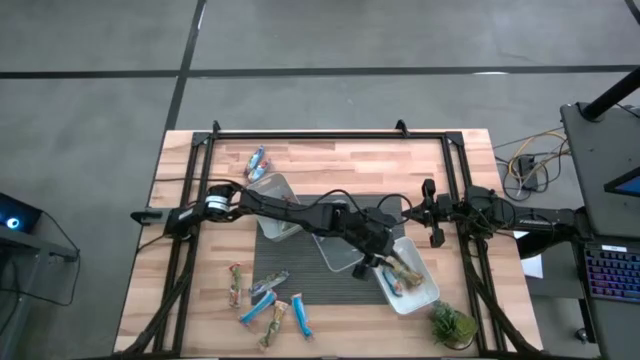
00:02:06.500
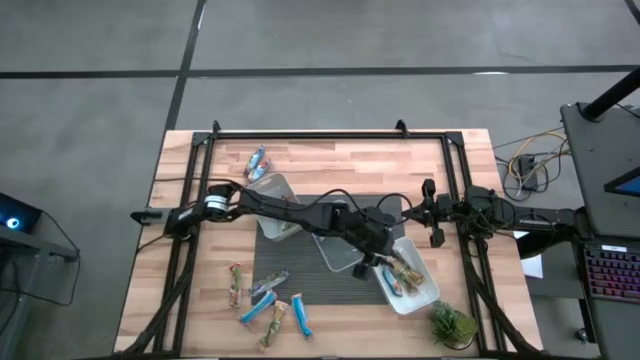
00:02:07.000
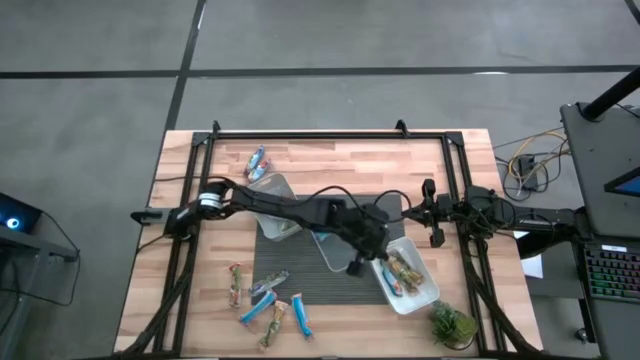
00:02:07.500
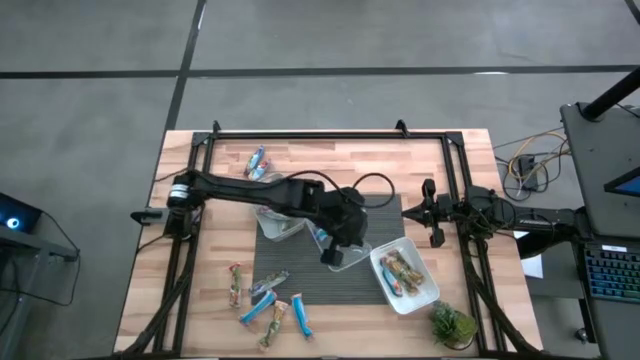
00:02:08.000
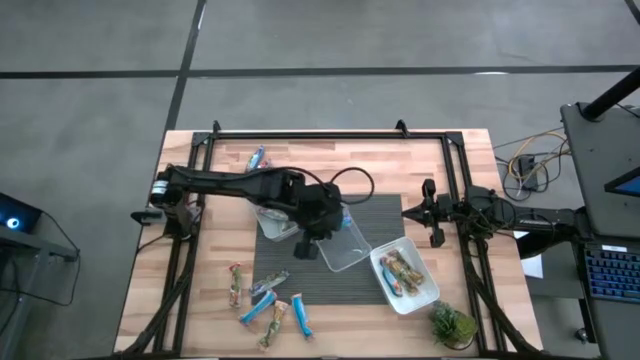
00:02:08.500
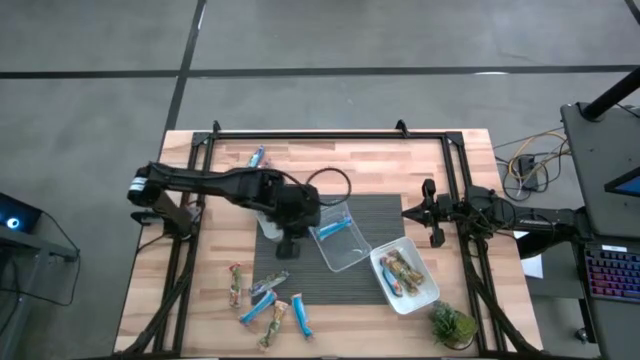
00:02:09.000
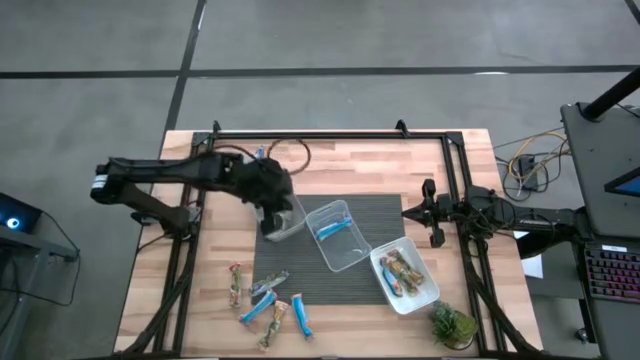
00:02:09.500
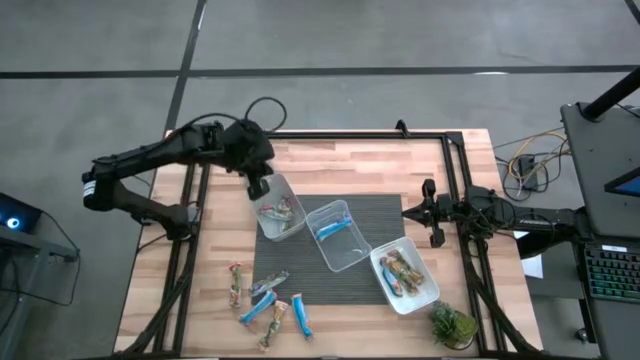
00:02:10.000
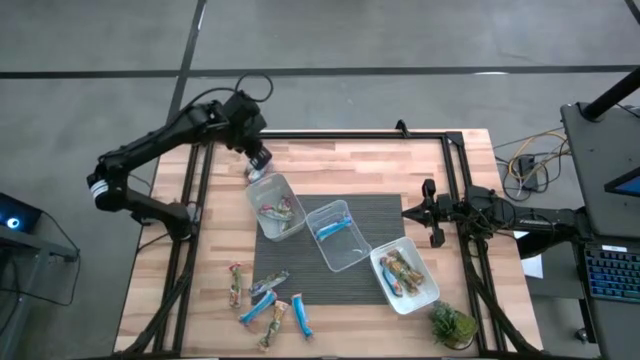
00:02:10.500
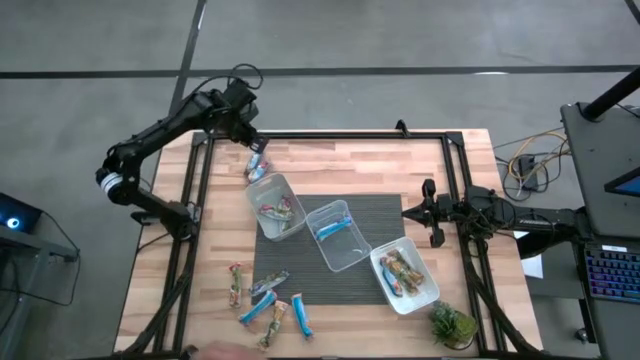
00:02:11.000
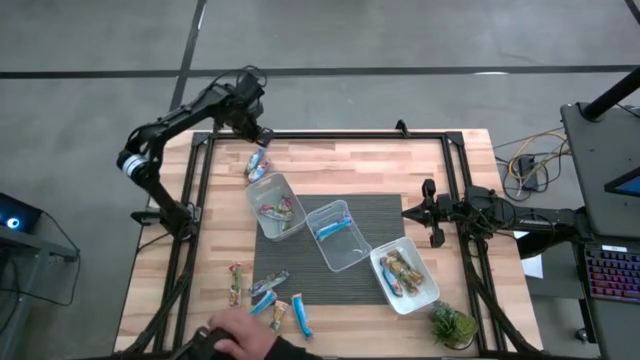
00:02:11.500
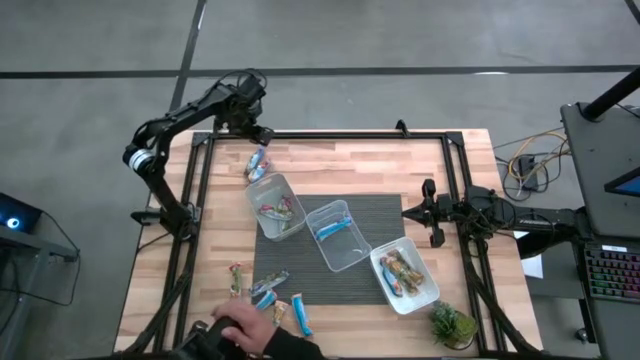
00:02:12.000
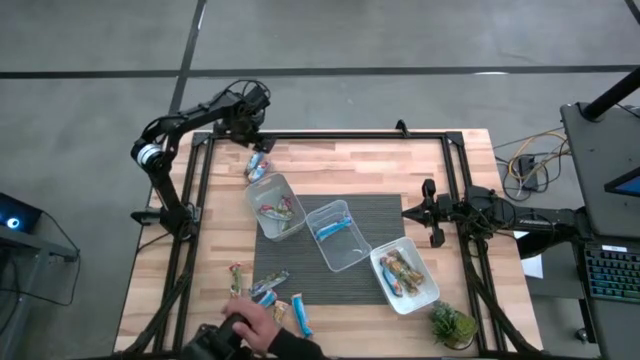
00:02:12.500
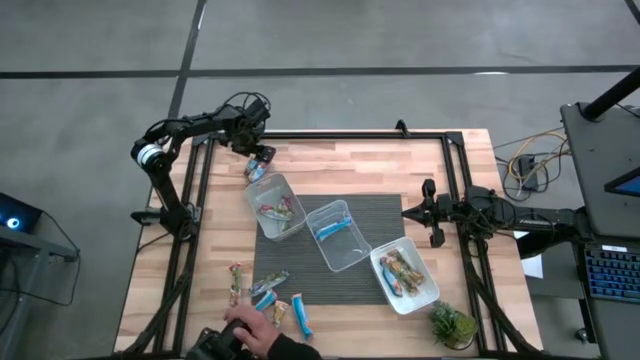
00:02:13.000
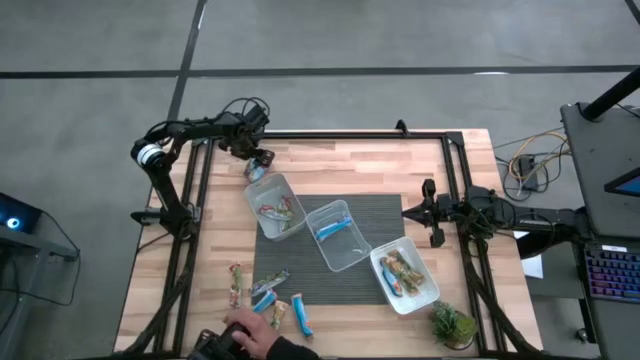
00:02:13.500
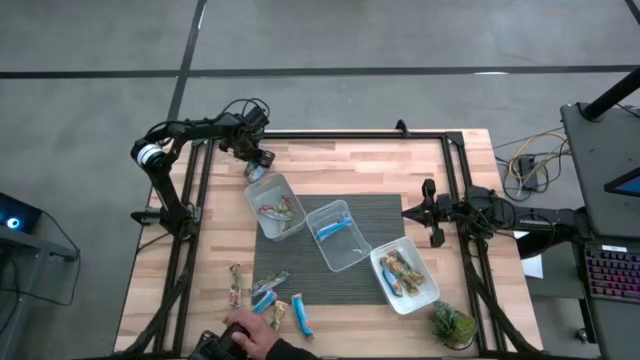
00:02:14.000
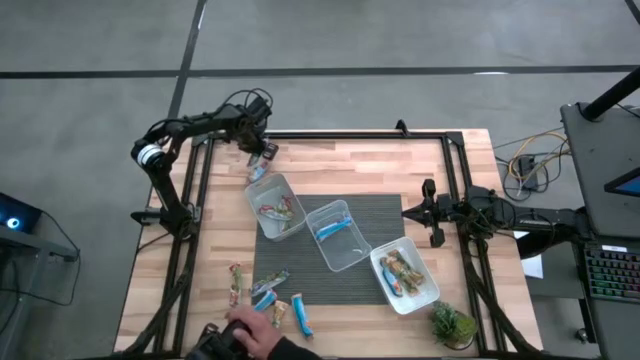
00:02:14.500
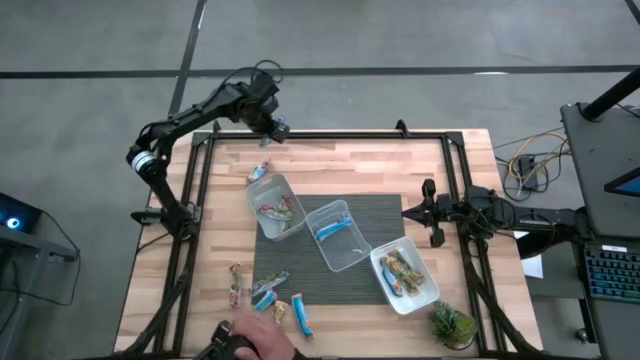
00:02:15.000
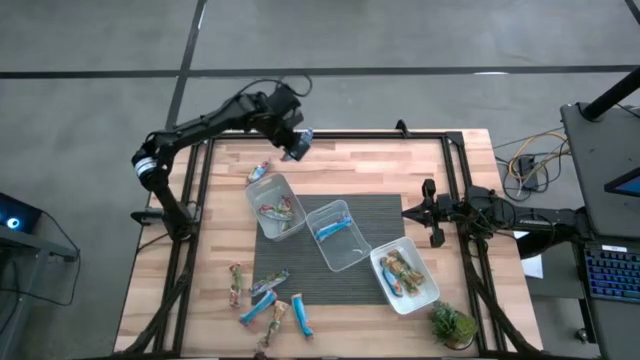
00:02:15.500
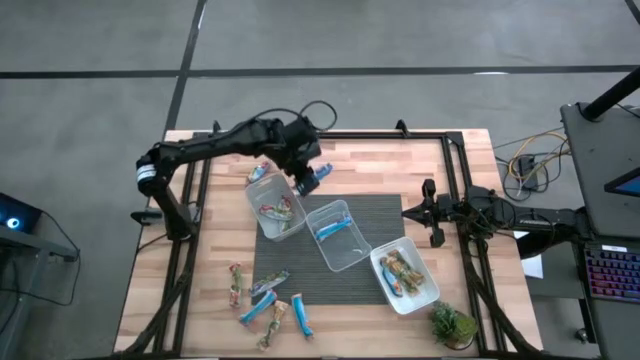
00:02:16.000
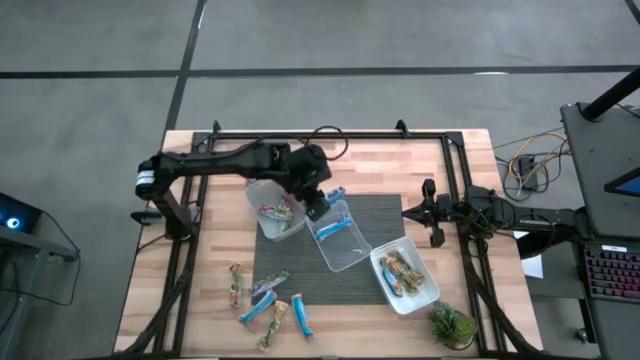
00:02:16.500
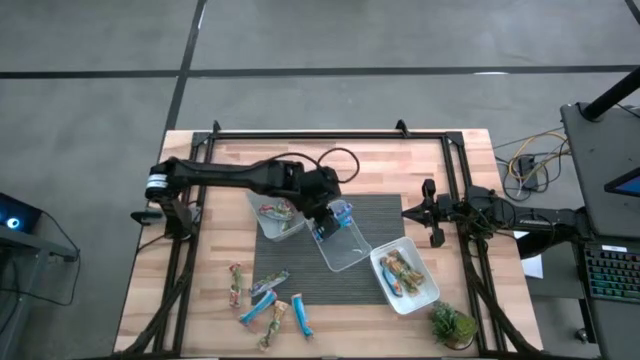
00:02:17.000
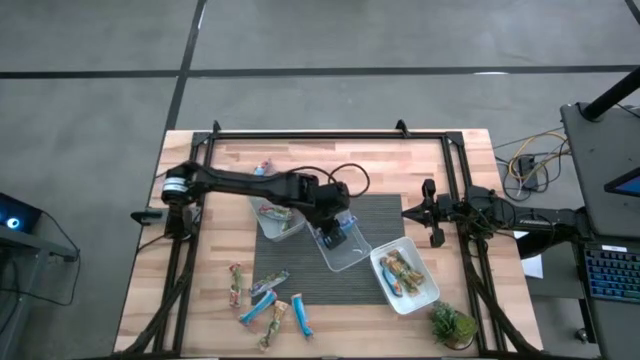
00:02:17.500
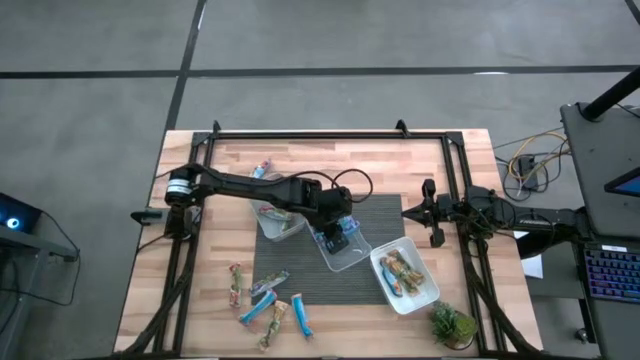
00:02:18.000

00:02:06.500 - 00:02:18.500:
Task: Pick and place Granola Bars by type
Put the blue granola bar into the transparent bin

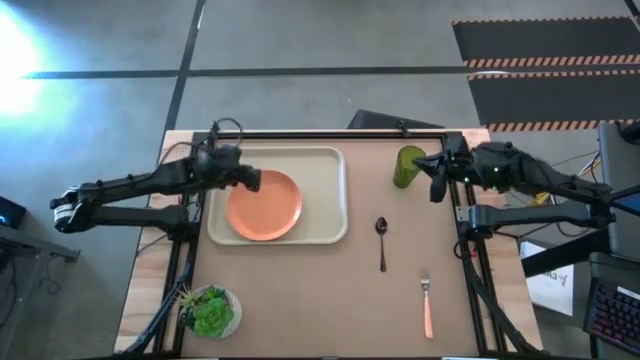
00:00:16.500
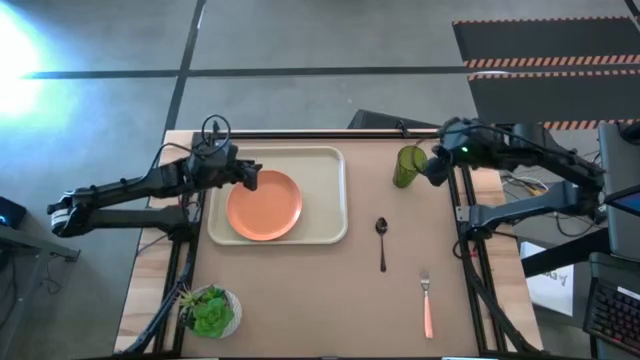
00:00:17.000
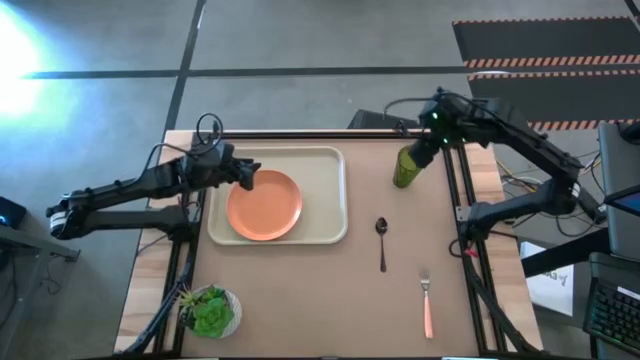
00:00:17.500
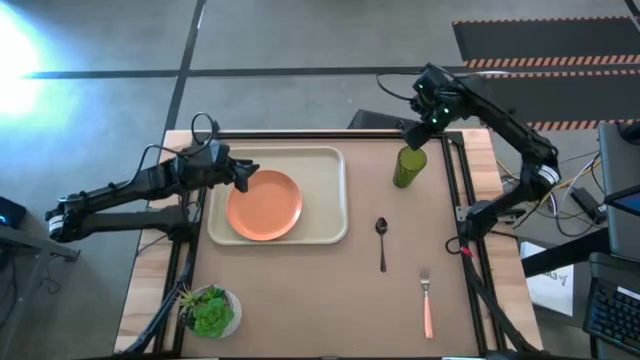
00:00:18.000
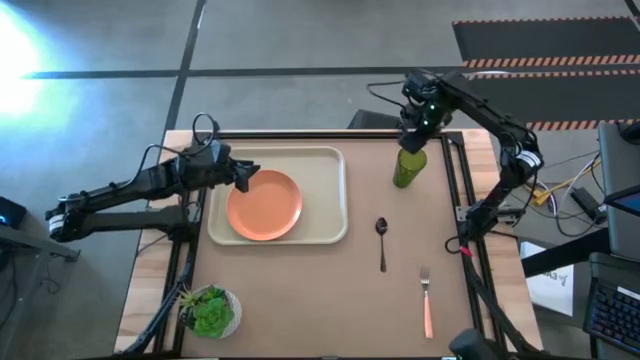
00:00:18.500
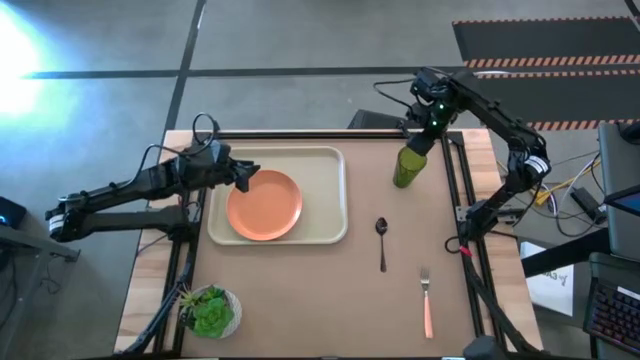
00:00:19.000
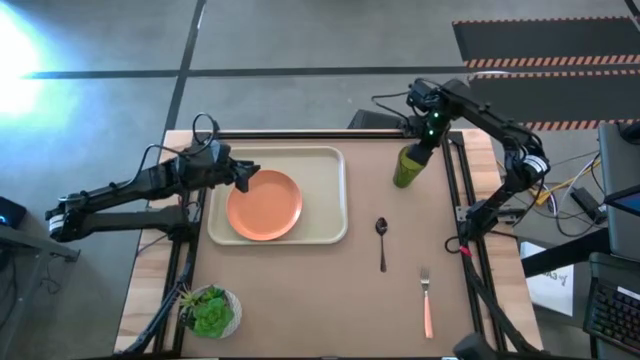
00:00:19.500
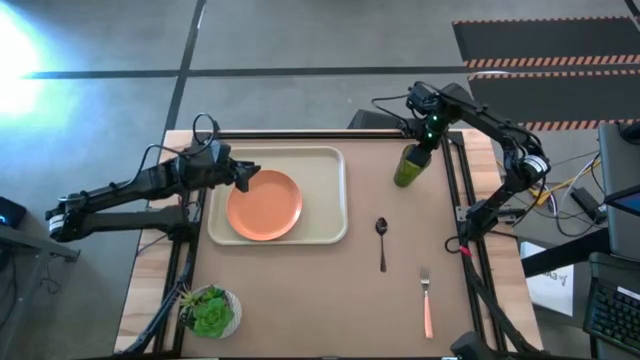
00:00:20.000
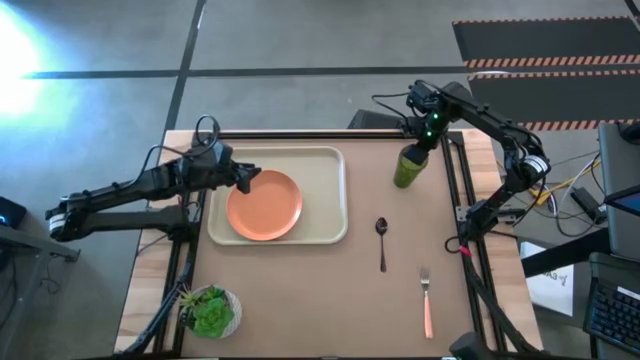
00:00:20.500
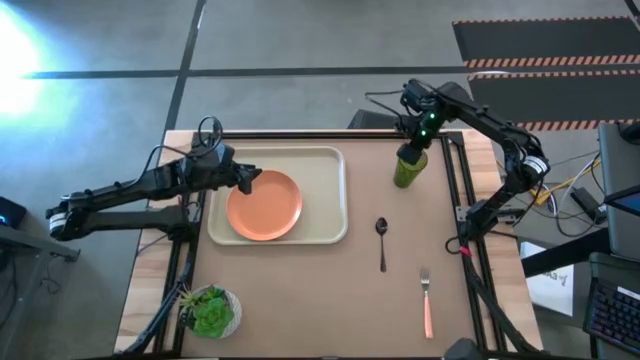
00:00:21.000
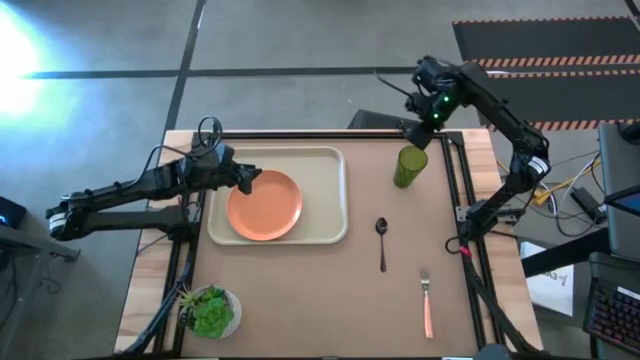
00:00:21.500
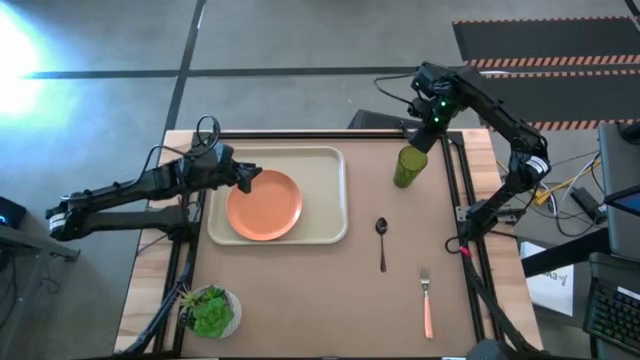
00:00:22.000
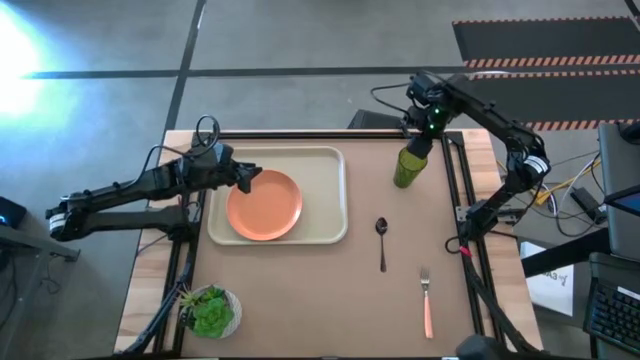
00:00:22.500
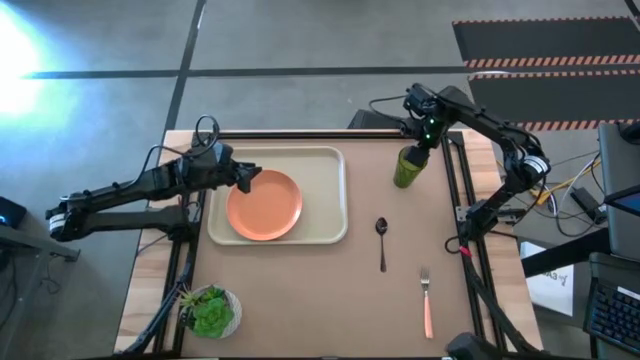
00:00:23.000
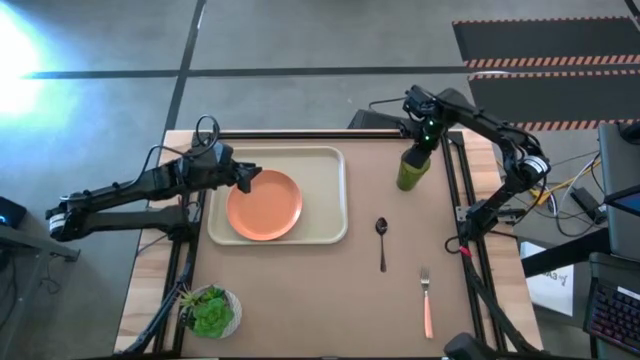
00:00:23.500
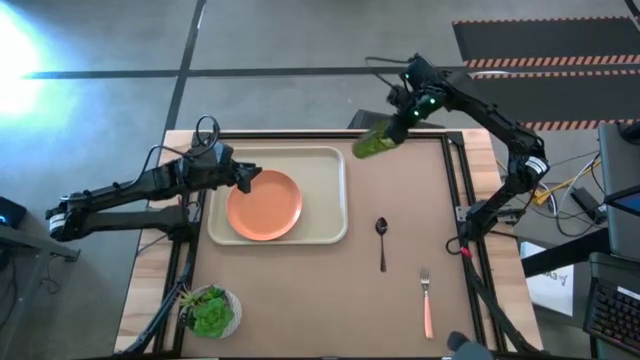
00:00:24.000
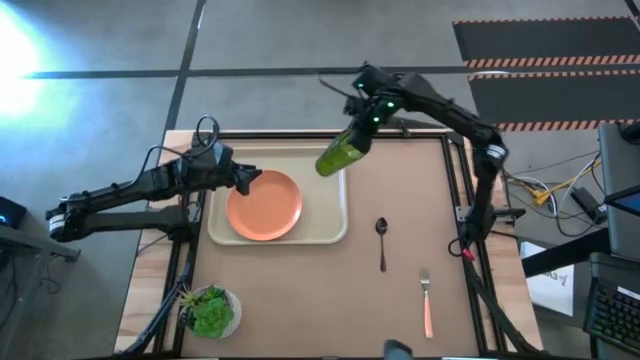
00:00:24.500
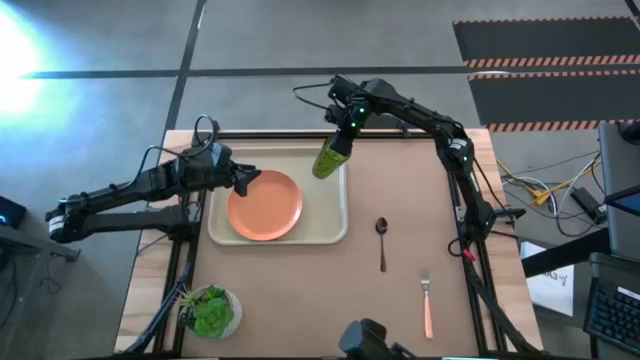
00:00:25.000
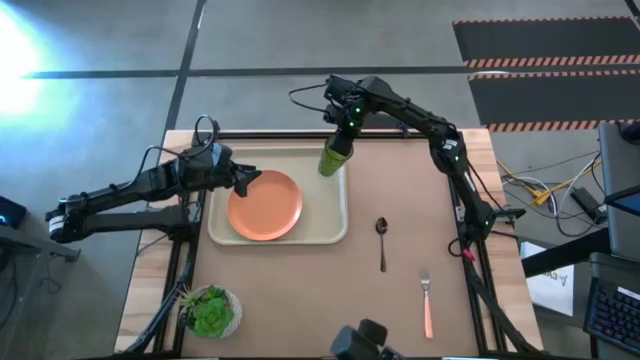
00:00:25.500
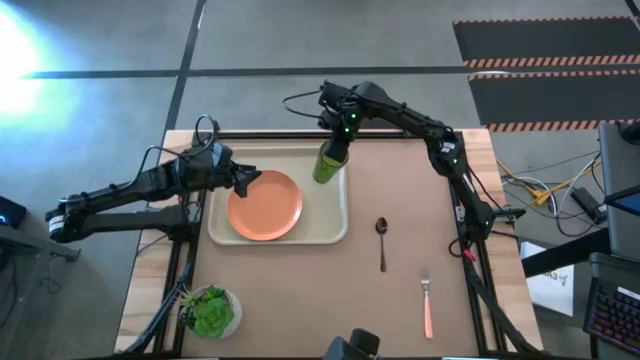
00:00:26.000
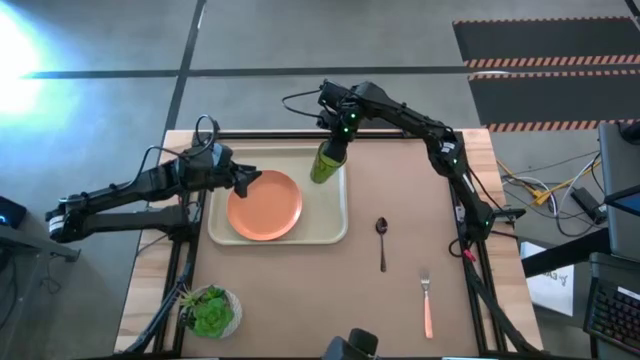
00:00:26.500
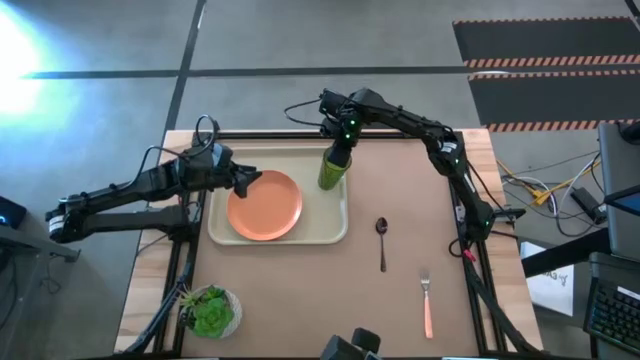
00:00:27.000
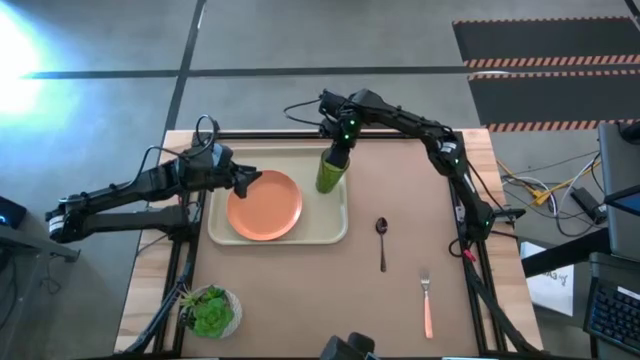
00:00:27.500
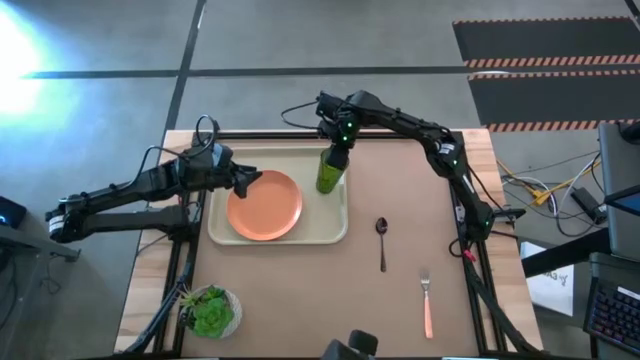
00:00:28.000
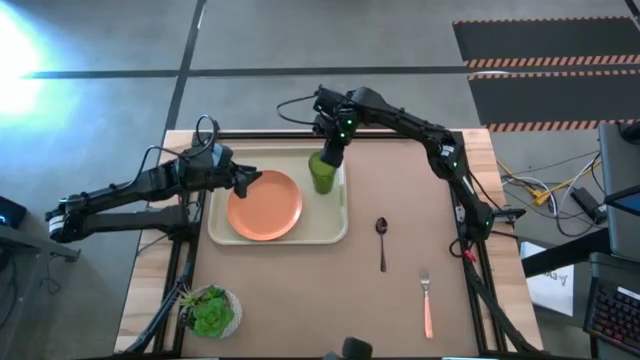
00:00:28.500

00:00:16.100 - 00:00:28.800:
Task: Pick and place plate/cup/fork/spoon on tray
Put the green glass on the white serving tray to the right of the orange plate
